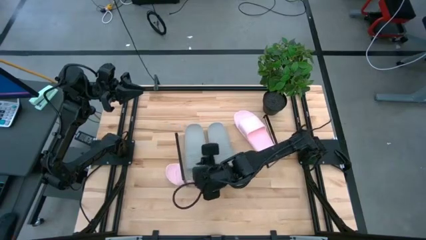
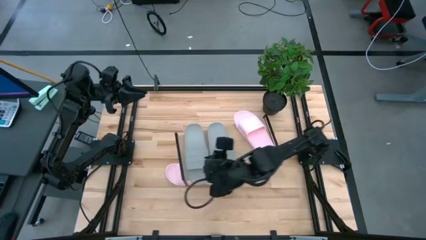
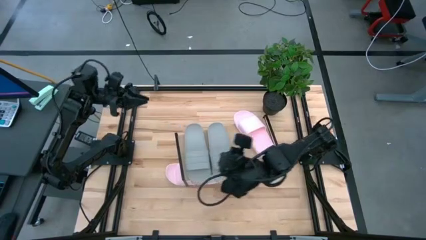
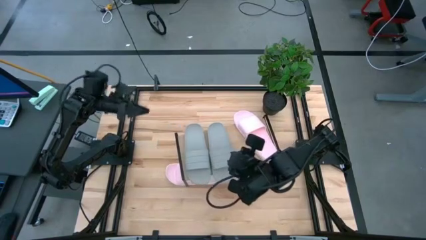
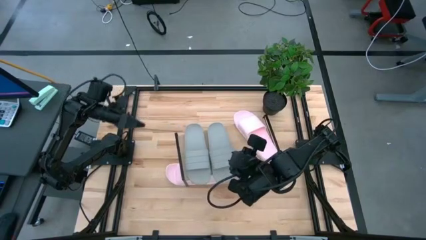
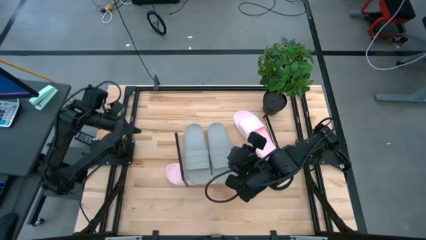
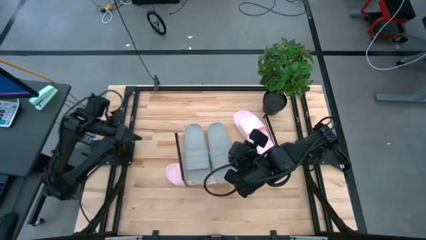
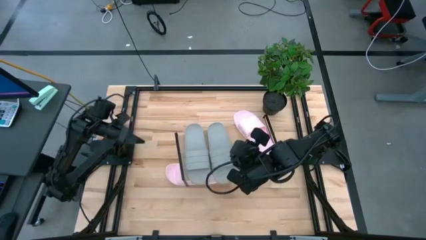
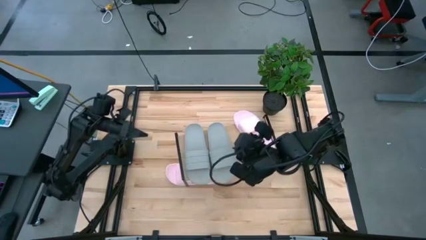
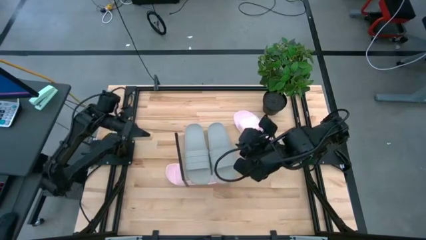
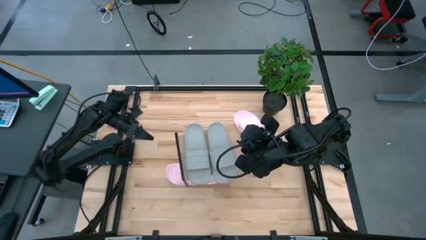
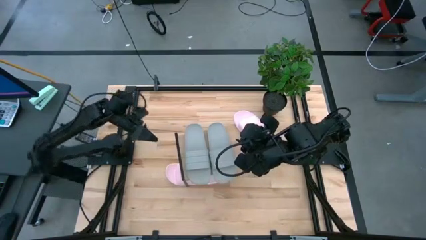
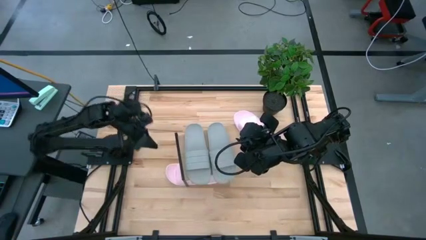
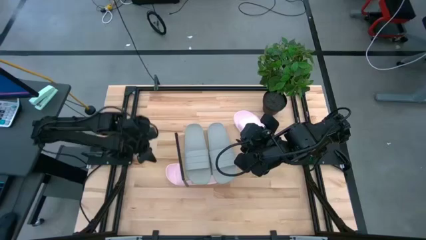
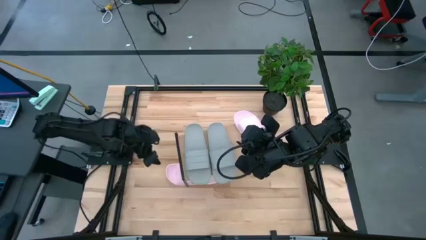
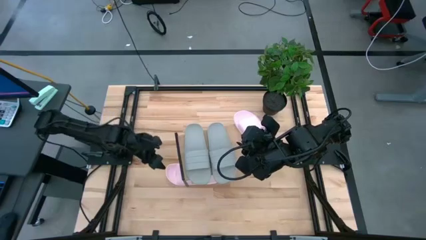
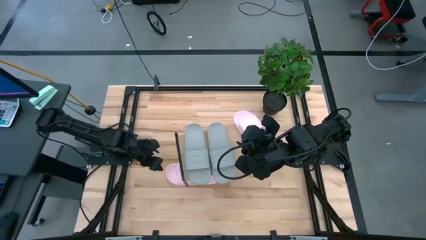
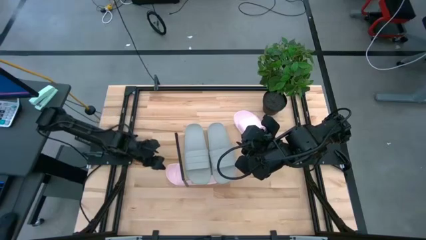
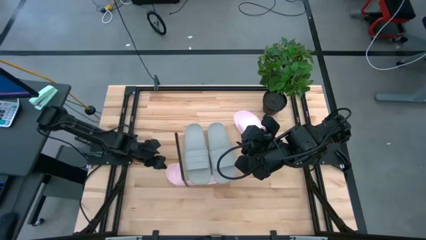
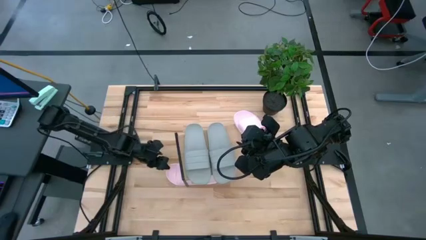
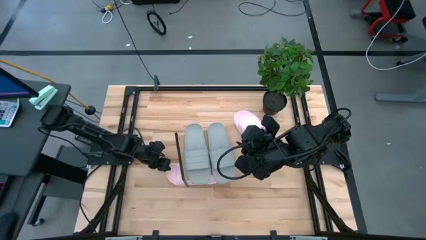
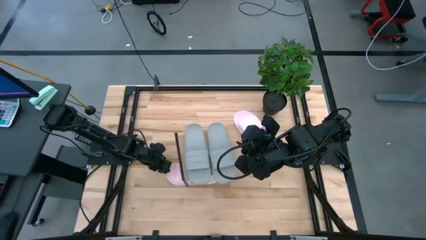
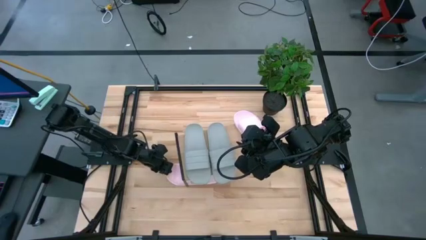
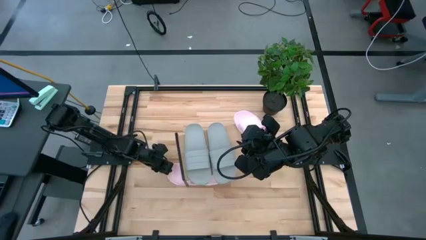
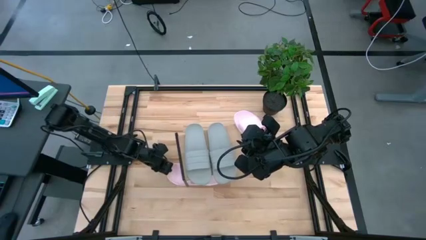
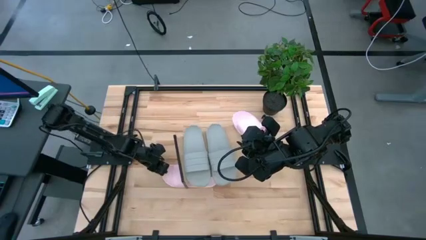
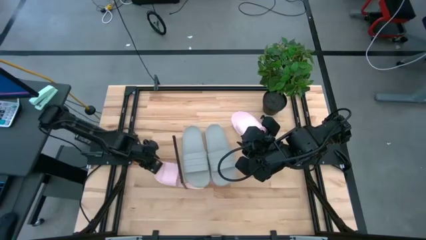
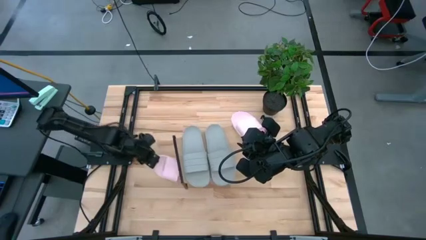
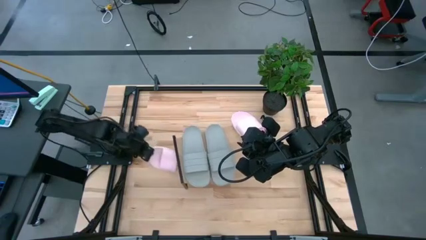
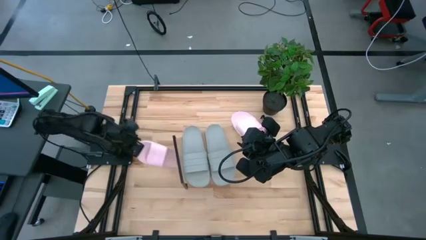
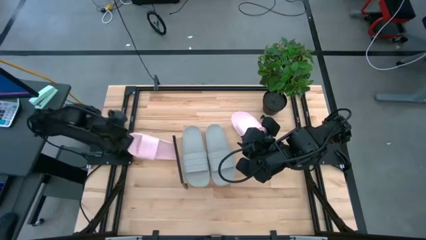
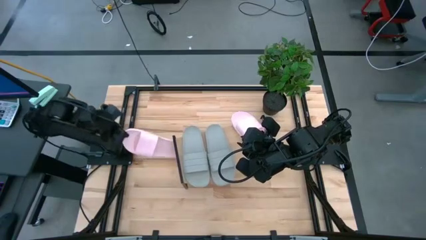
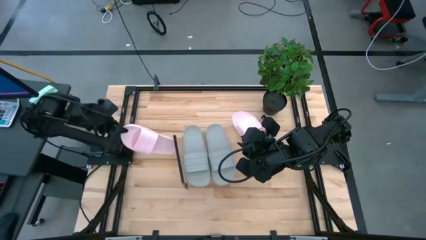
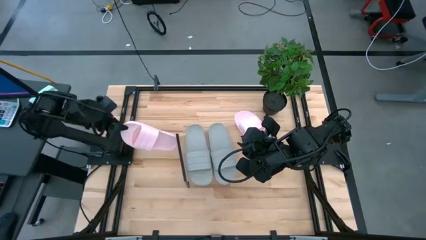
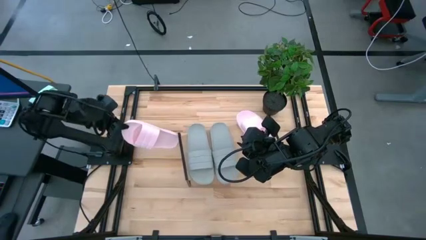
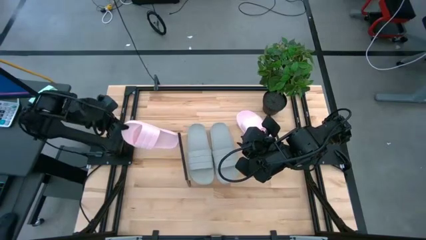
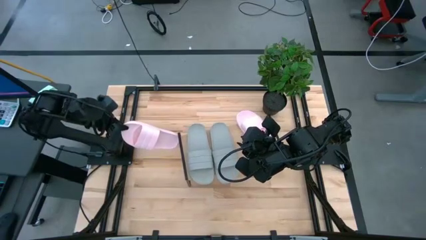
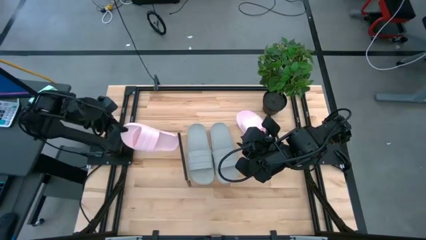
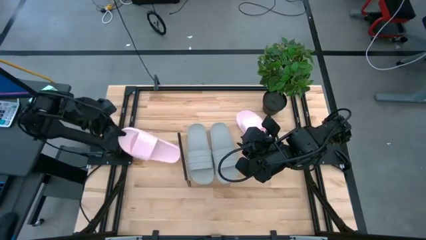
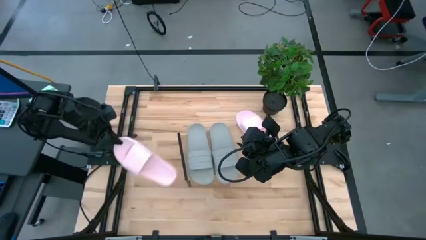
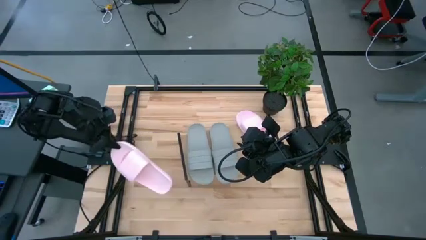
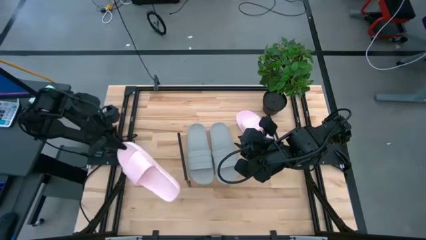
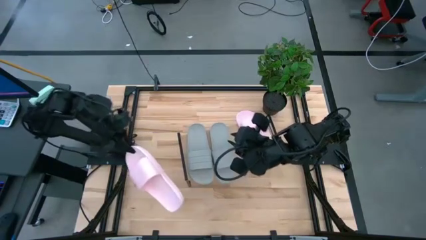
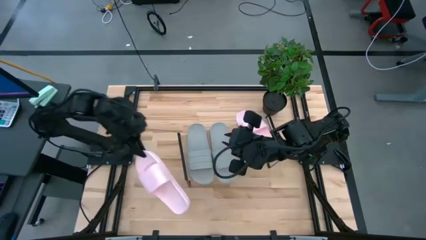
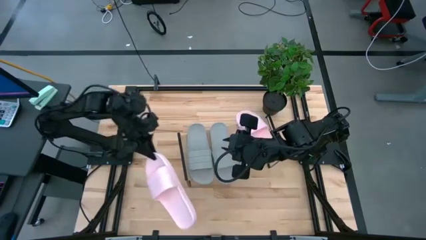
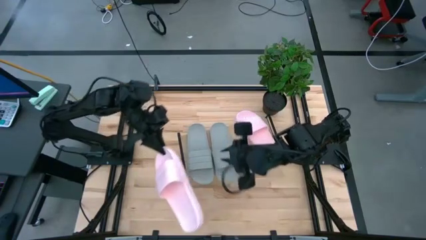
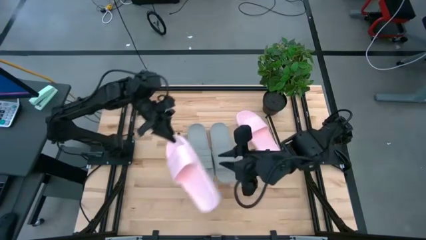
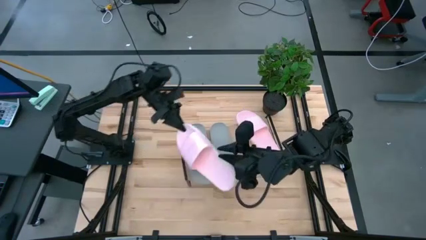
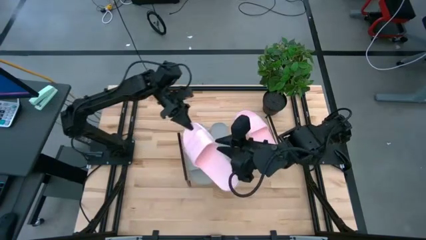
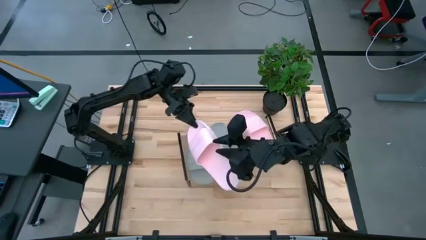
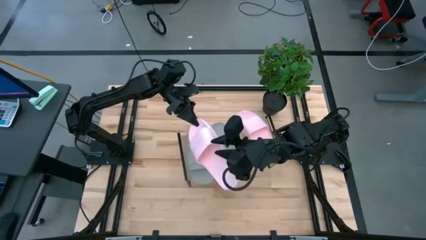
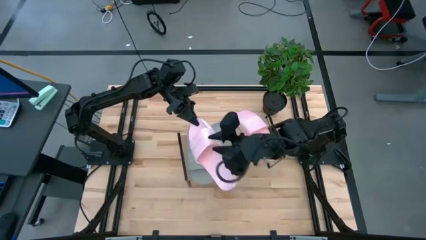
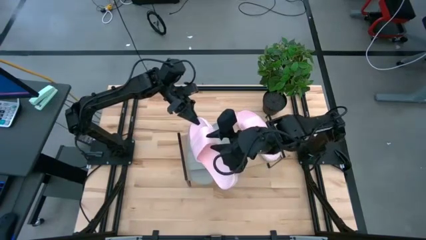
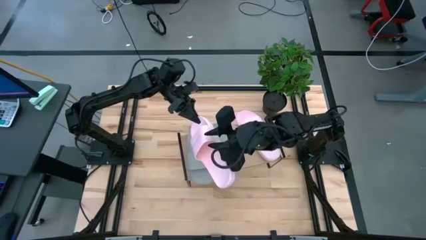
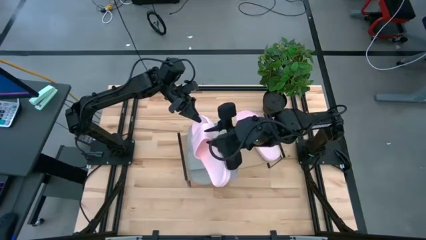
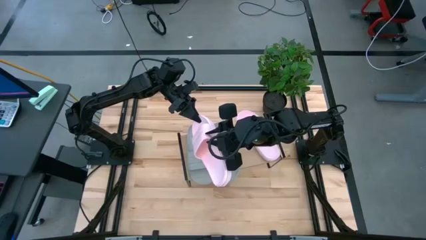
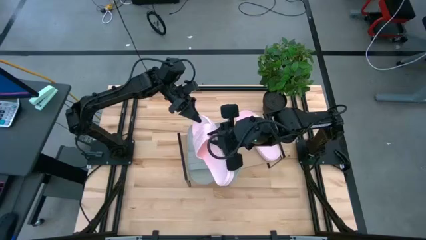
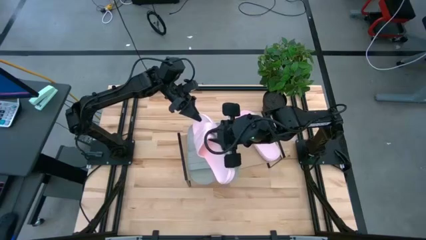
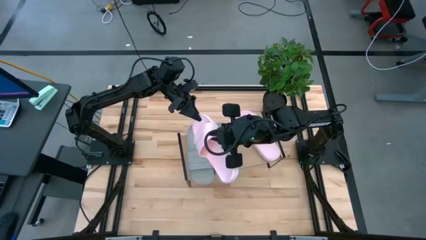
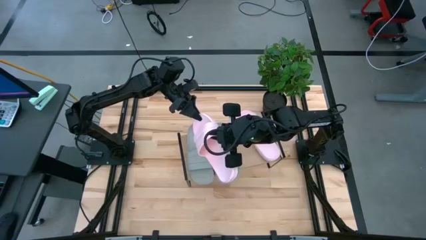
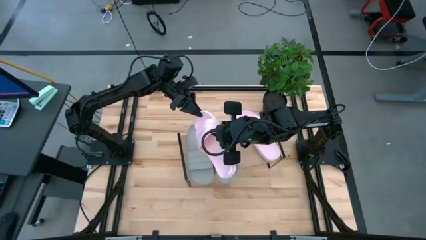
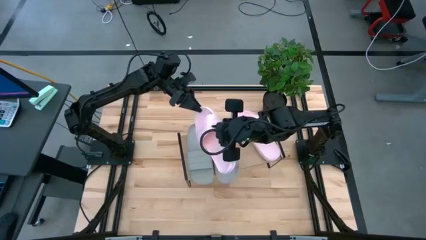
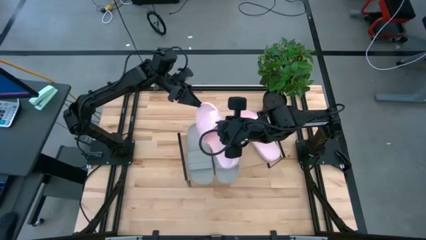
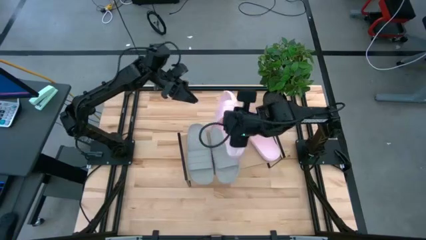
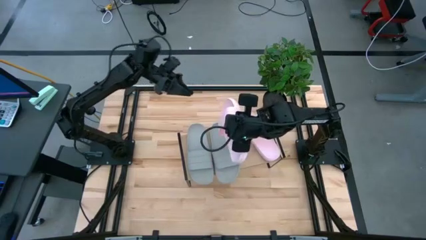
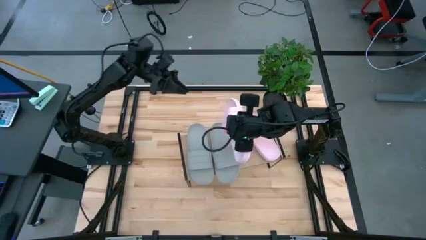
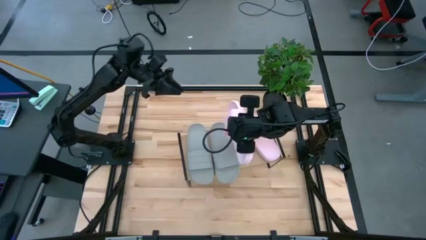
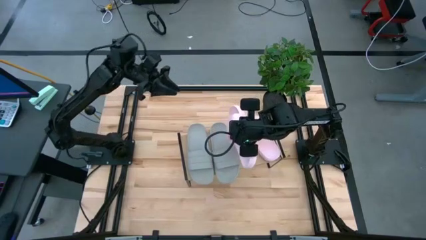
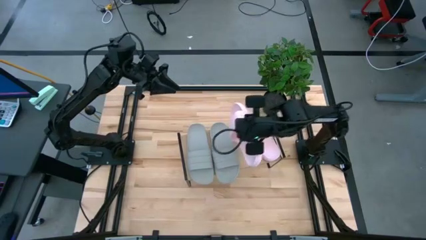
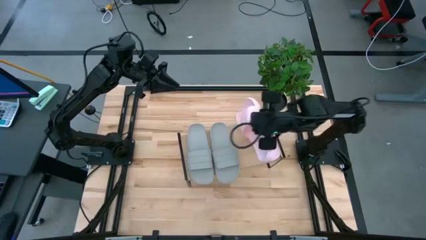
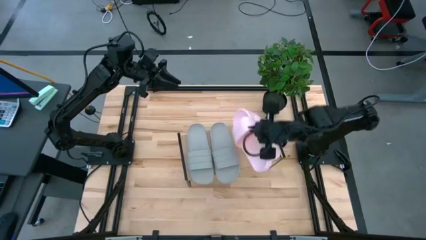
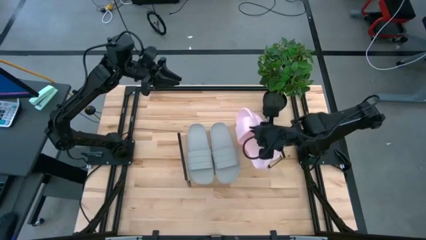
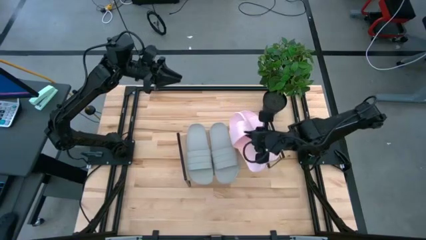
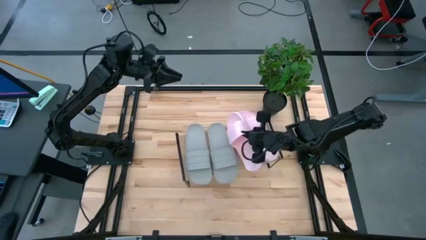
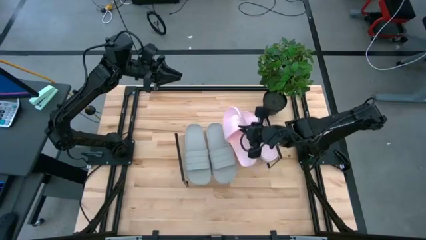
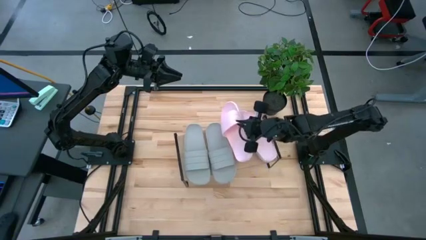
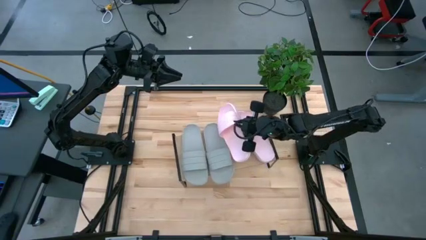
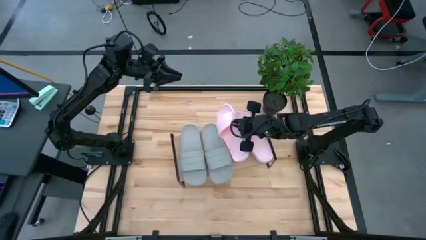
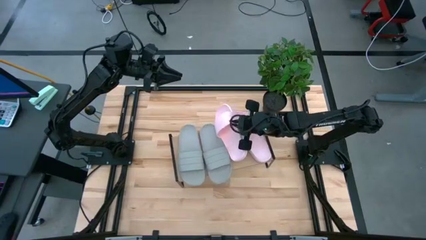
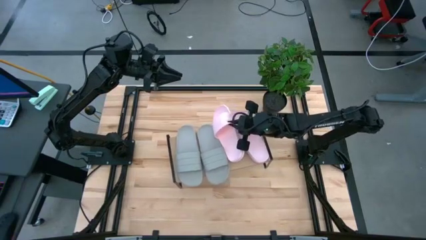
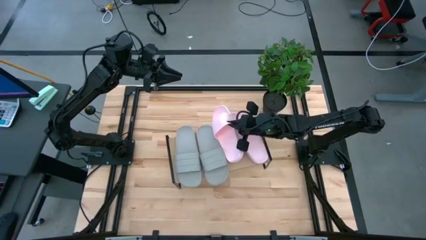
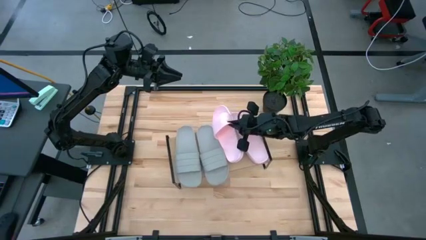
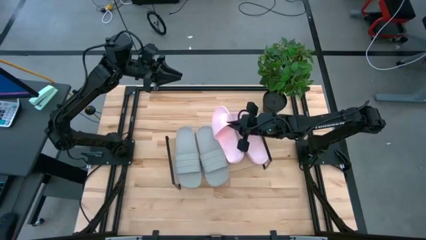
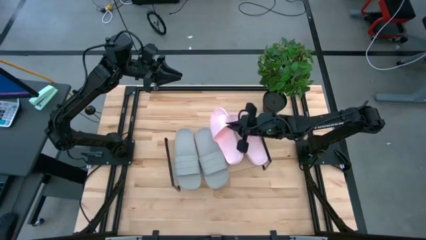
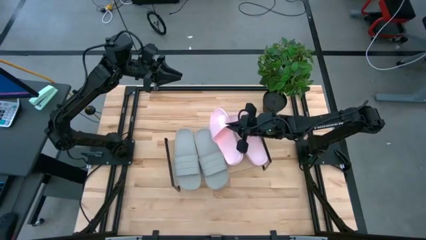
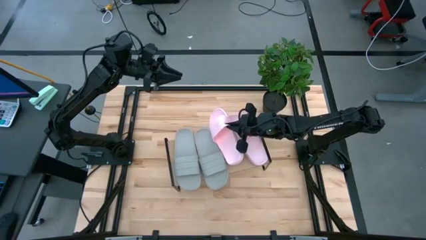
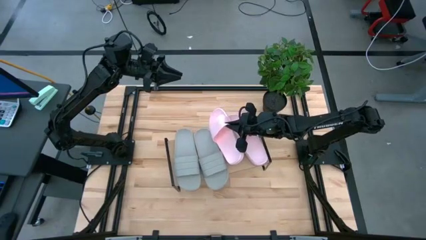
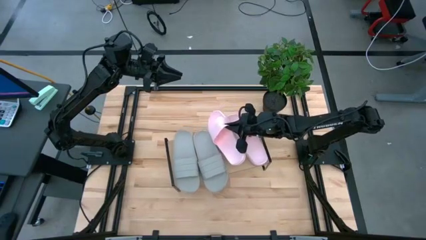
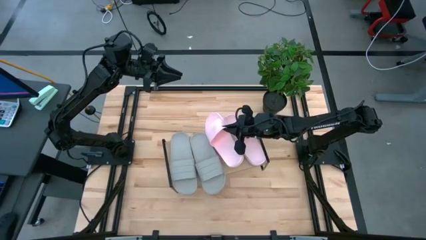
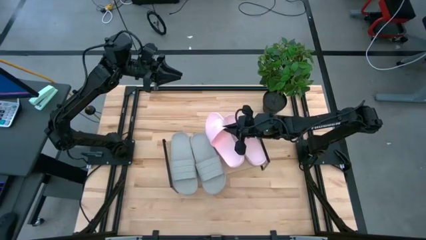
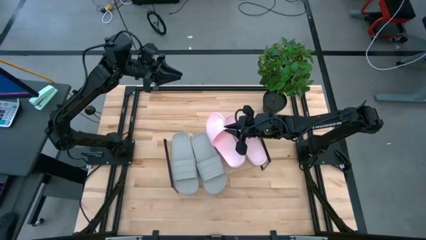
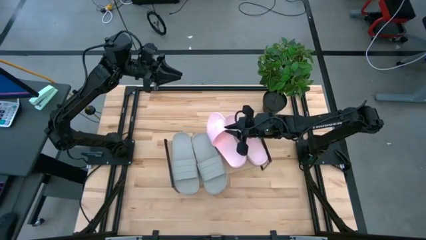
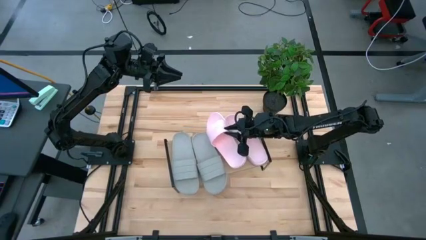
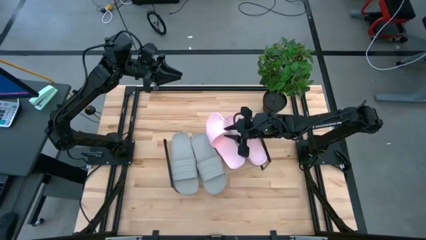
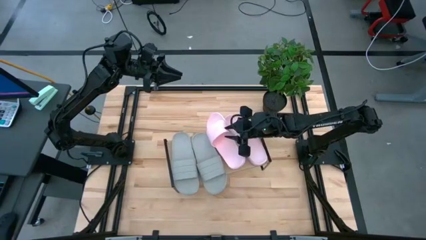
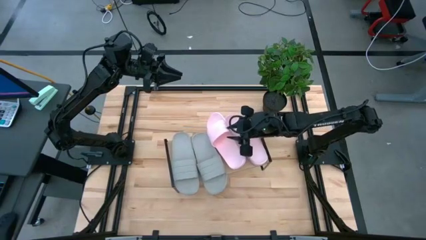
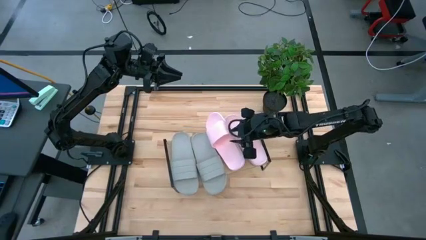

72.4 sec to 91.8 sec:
Task: Pick and place slides into the shelf
Put the pink slide on the shelf
